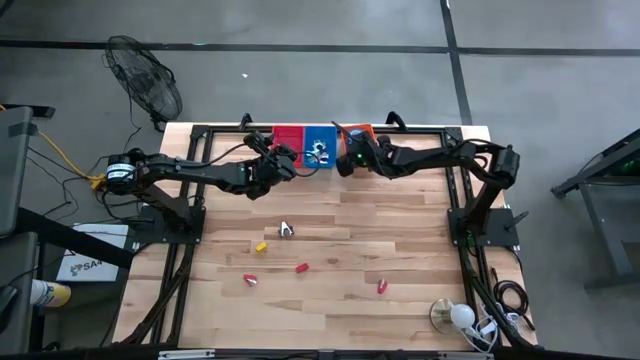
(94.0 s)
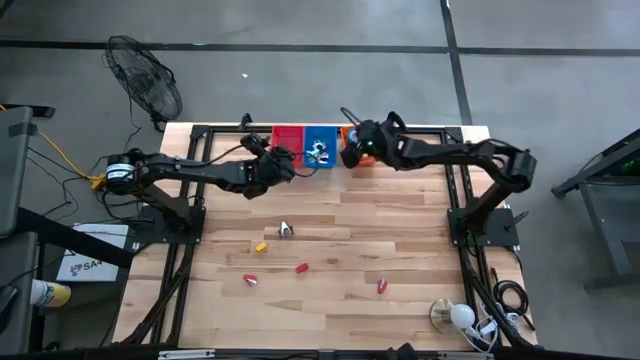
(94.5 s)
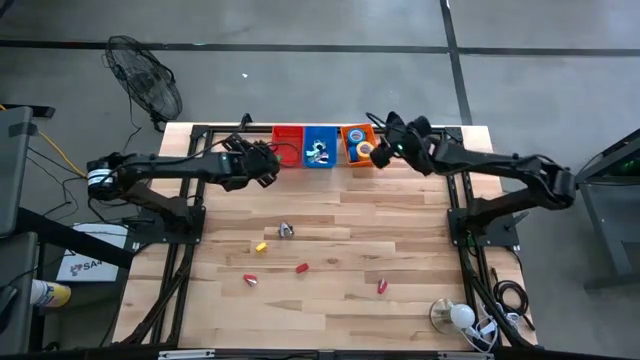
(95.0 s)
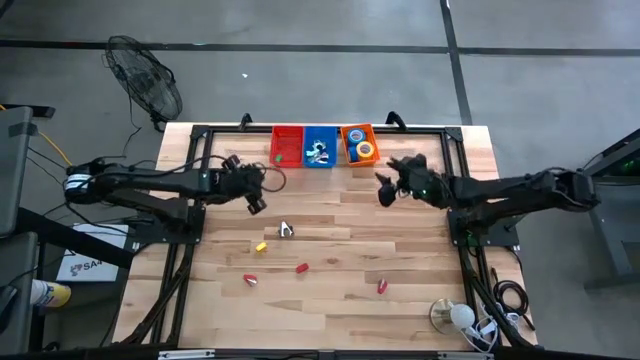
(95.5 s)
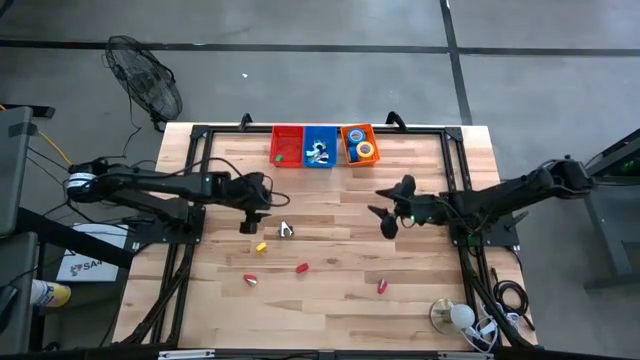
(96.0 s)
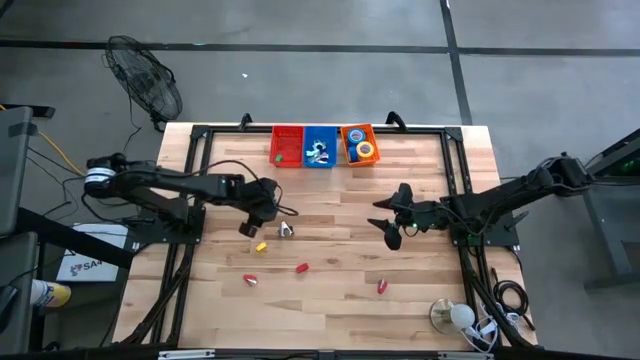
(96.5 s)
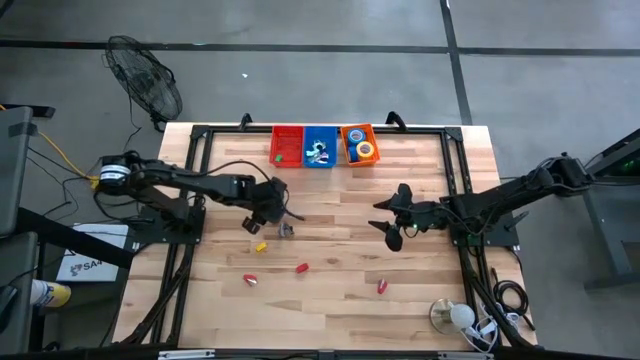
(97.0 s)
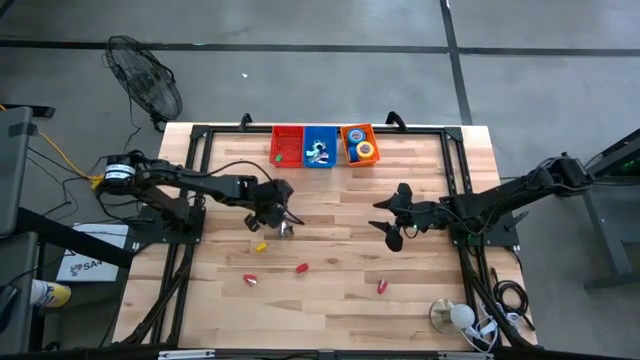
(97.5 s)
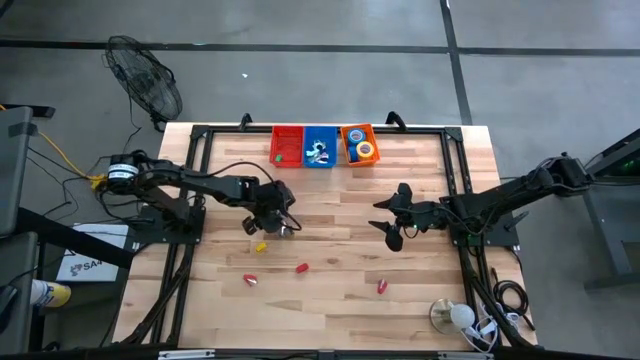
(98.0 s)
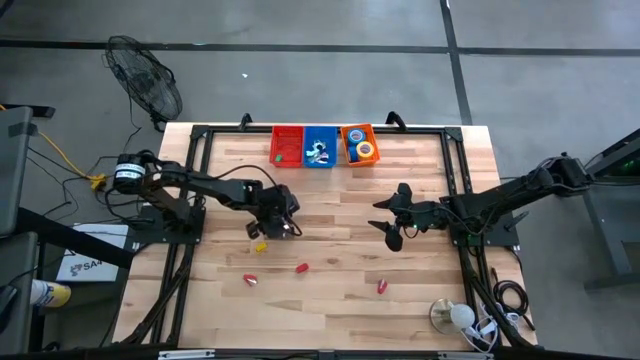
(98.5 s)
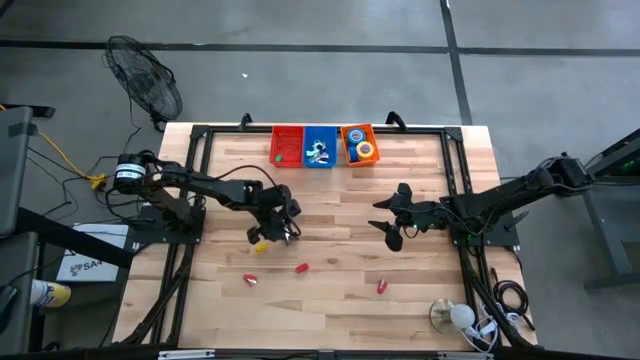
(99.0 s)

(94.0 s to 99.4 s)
Task: Pick and place Stapler, Stapler remover, tape
Put the black staple remover into the blue bin

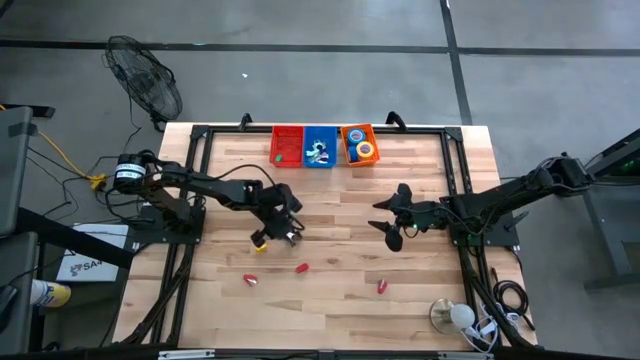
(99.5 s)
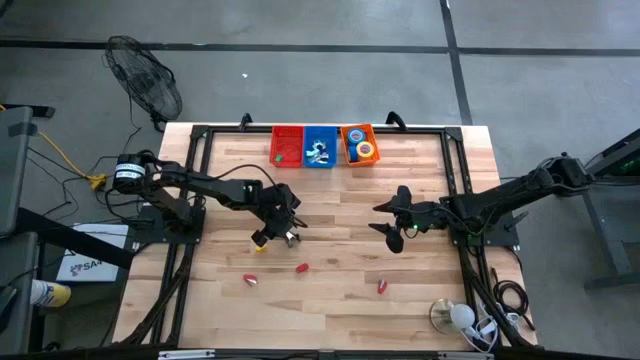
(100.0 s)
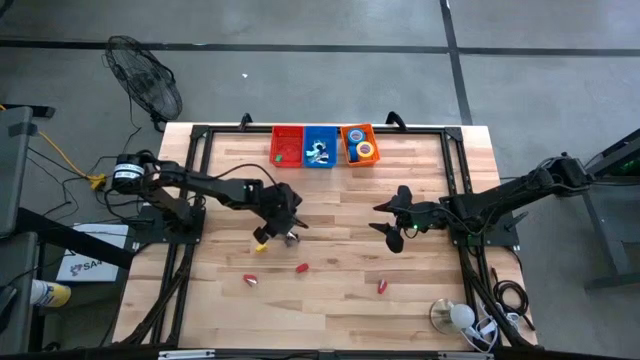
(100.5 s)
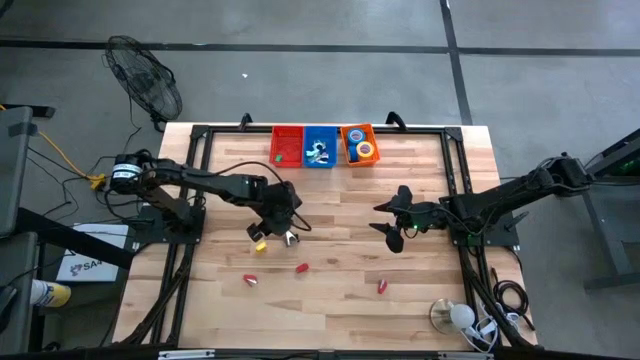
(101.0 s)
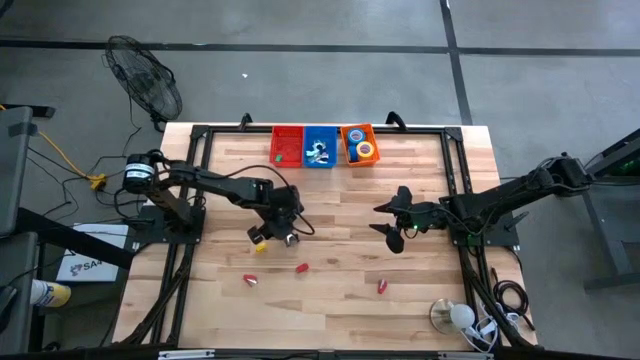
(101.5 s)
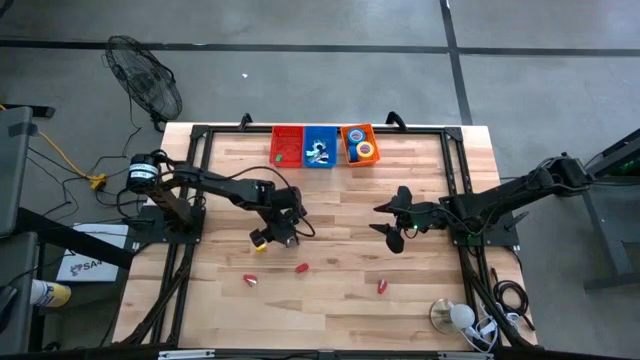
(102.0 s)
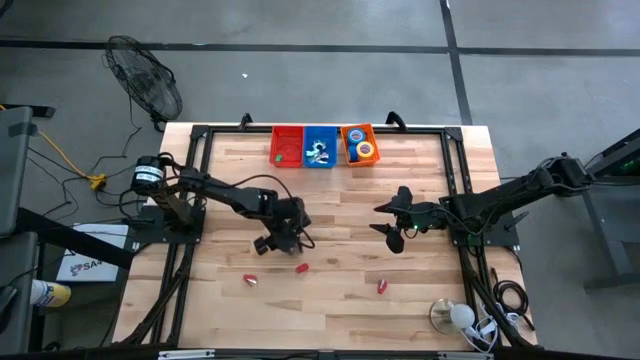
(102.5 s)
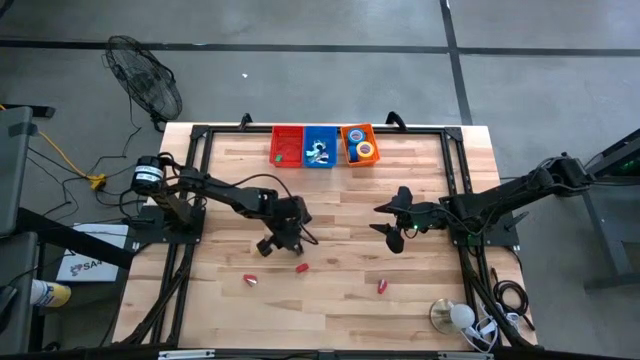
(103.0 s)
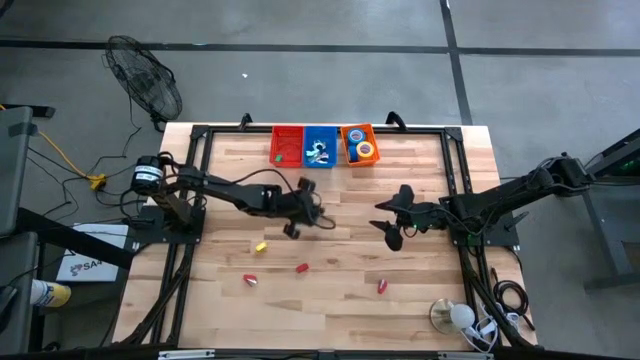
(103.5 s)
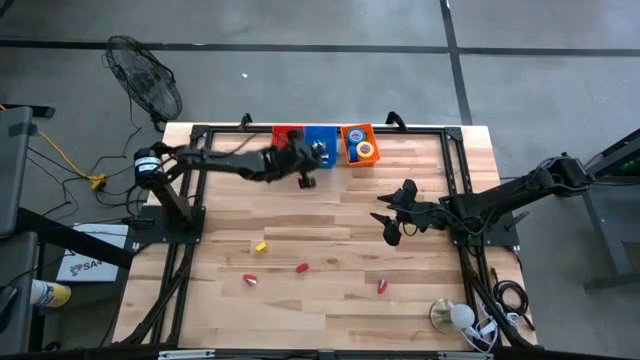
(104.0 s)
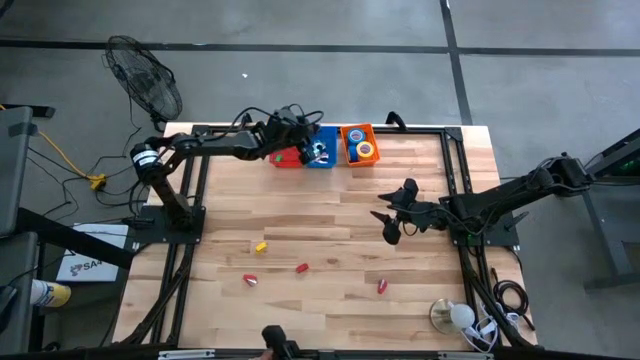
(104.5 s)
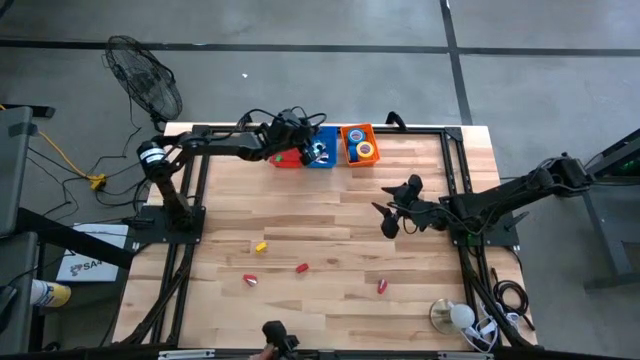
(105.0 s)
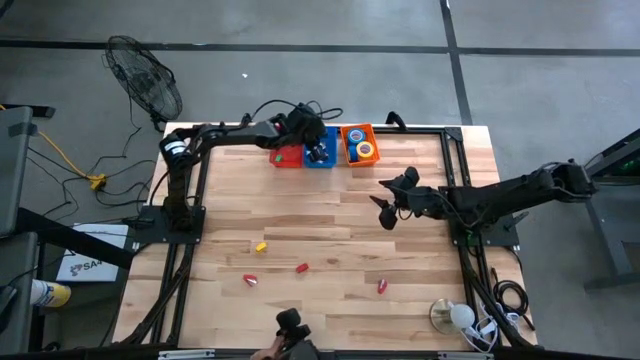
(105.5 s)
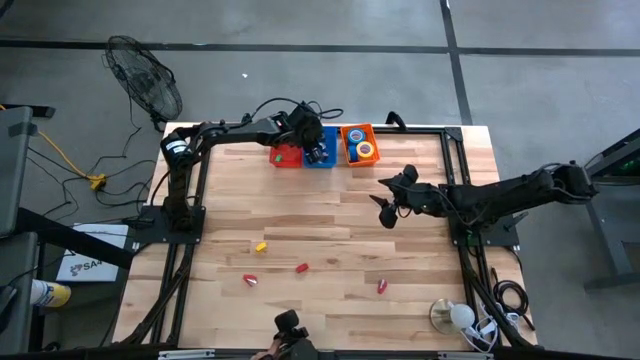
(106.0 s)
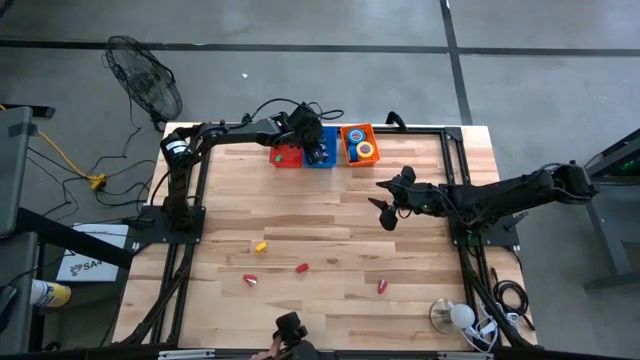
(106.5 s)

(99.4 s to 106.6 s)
Put the black staple remover into the blue bin

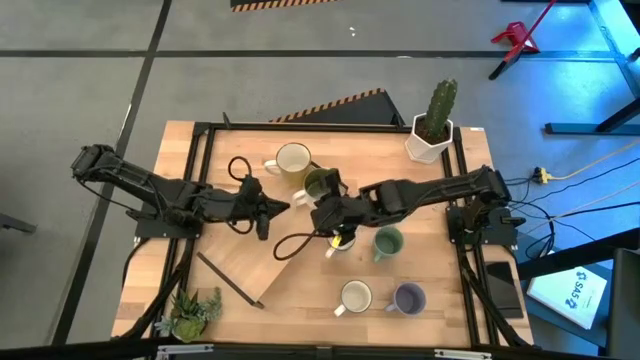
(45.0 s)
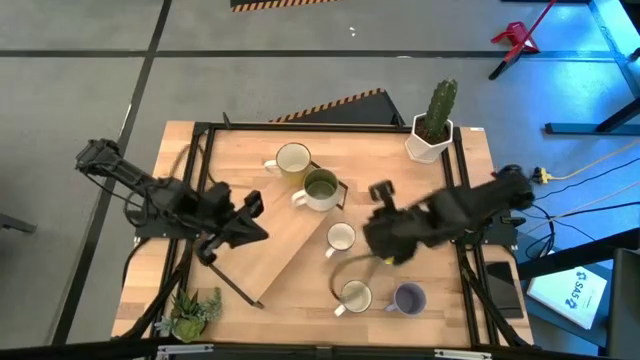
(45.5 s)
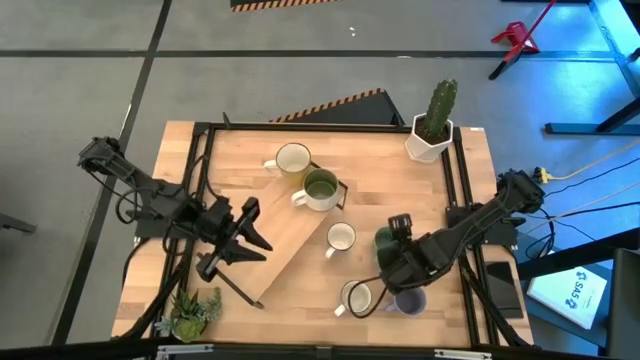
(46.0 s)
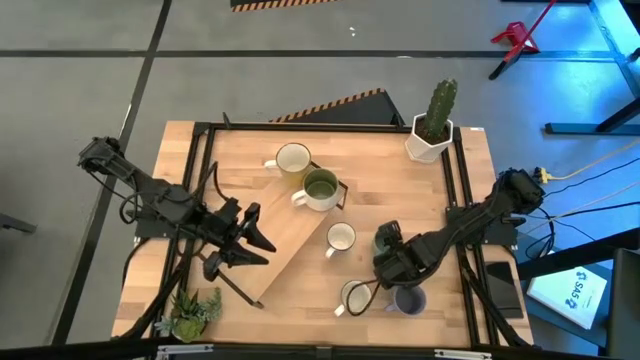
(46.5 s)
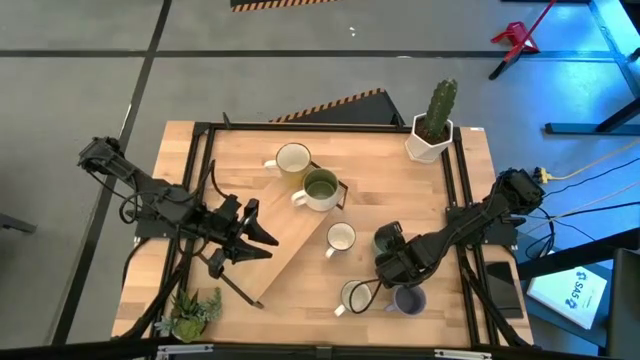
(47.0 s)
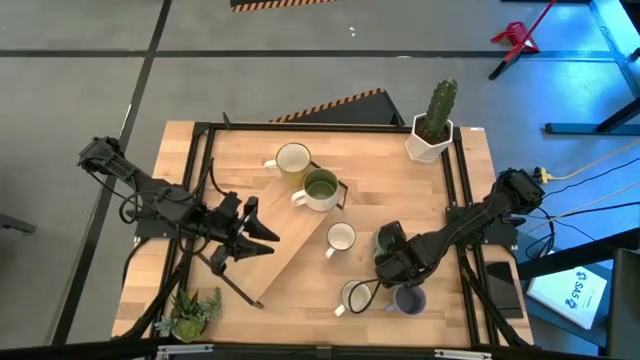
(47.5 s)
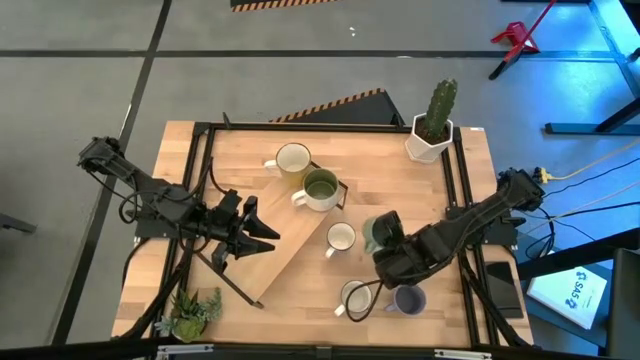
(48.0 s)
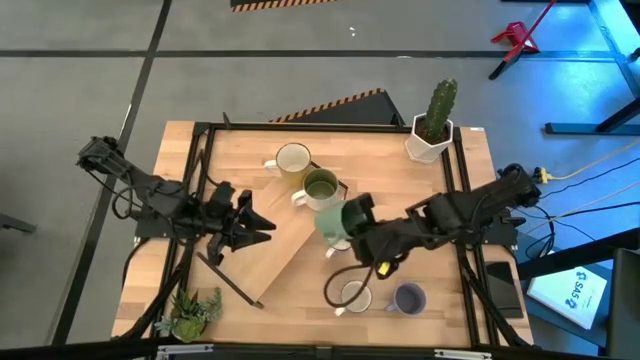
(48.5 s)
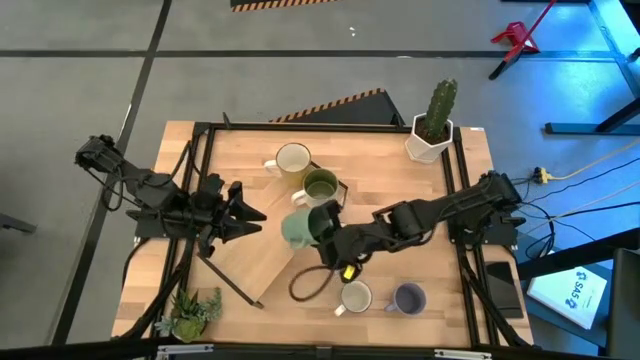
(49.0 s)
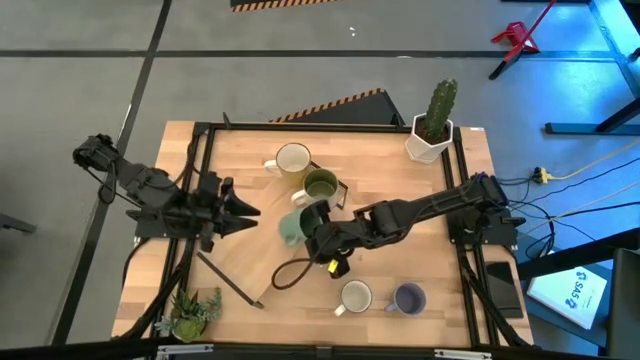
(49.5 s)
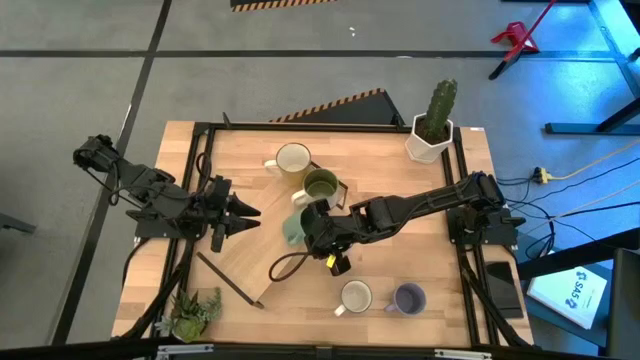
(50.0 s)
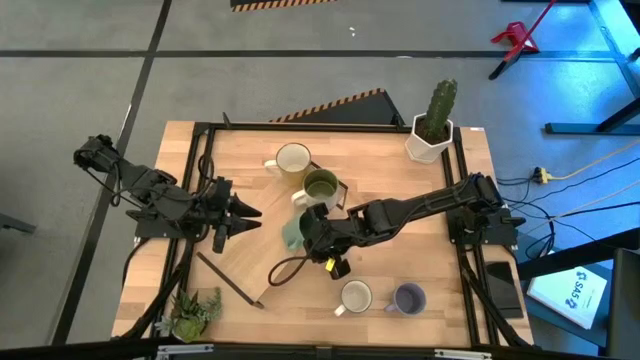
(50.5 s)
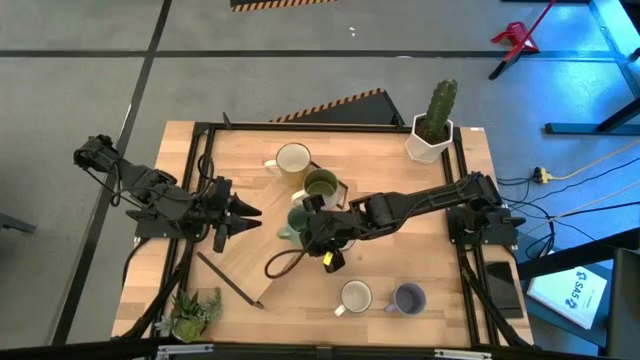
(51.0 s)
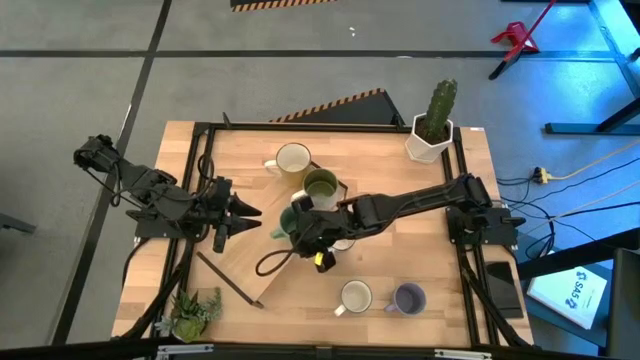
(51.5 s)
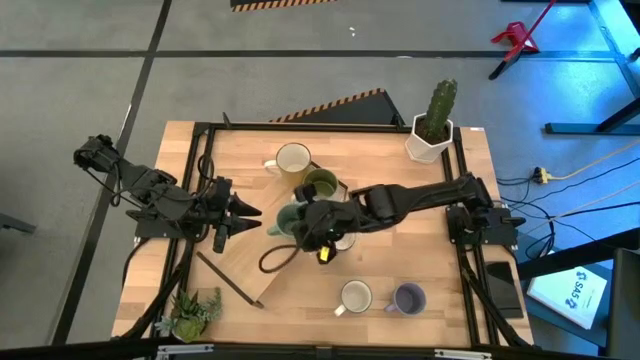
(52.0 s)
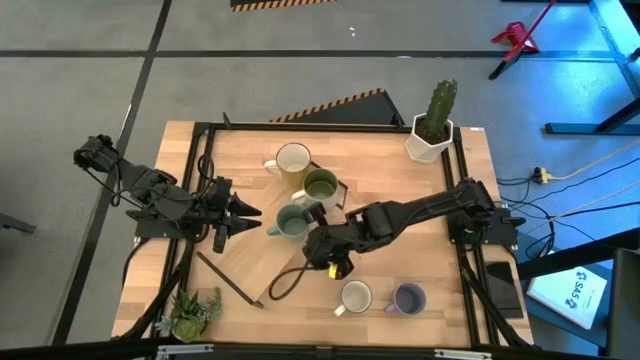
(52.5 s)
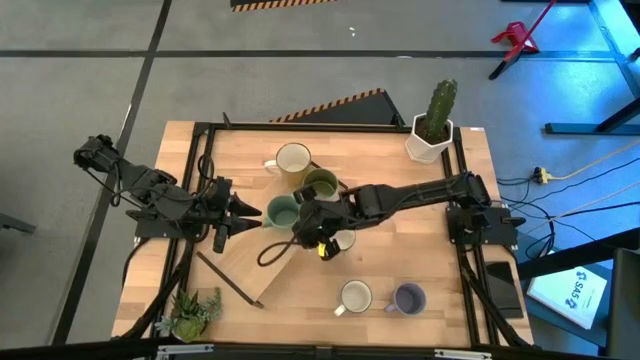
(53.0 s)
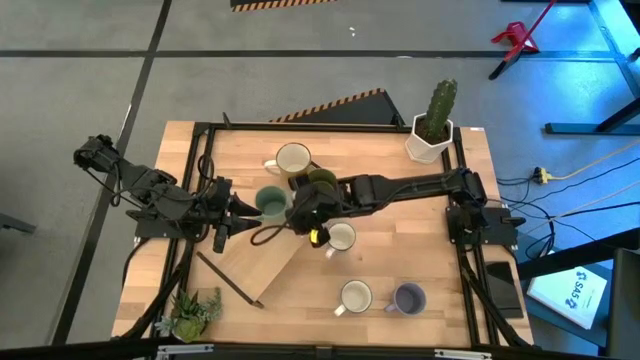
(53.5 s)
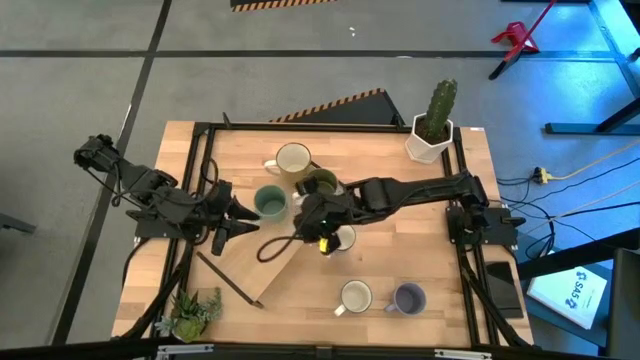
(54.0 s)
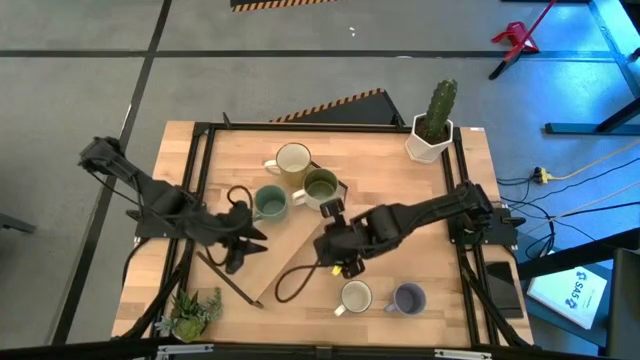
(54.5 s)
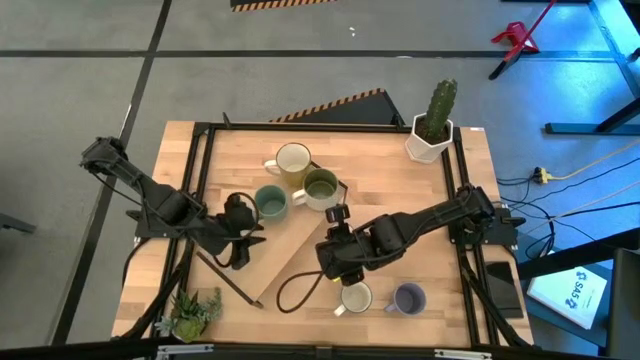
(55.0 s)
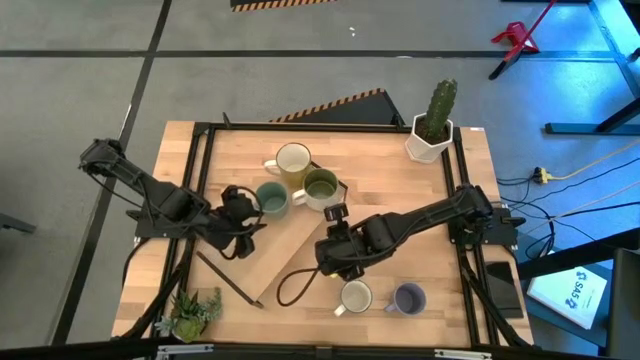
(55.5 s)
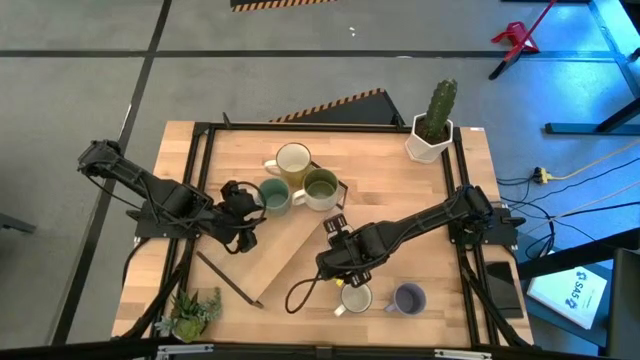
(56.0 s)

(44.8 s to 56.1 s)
Task: Place coffee mugs
Put the green mug on the shelf
